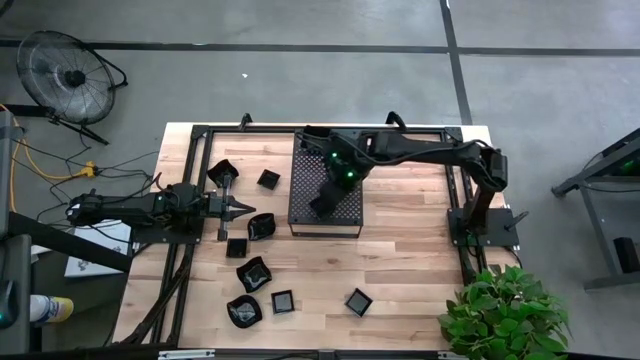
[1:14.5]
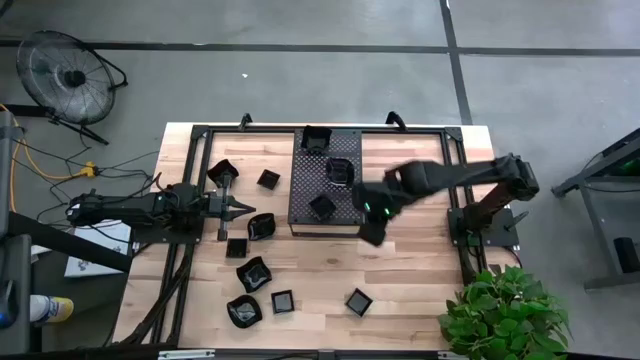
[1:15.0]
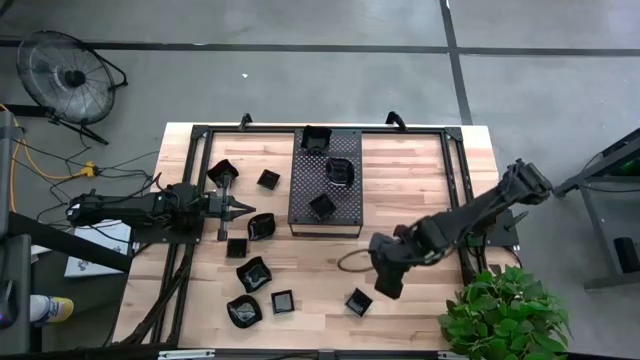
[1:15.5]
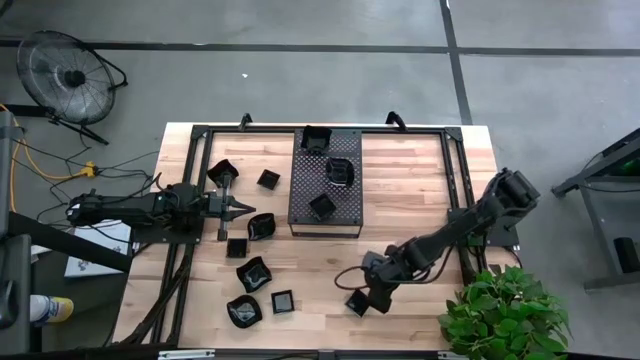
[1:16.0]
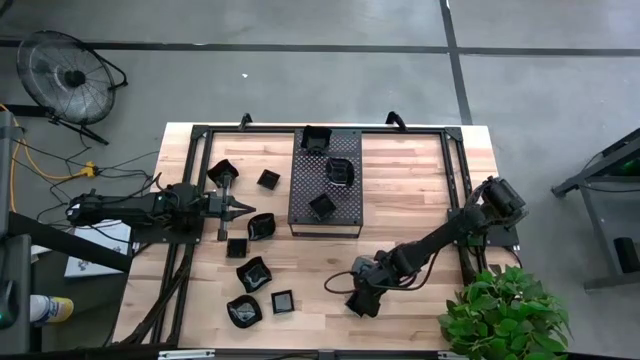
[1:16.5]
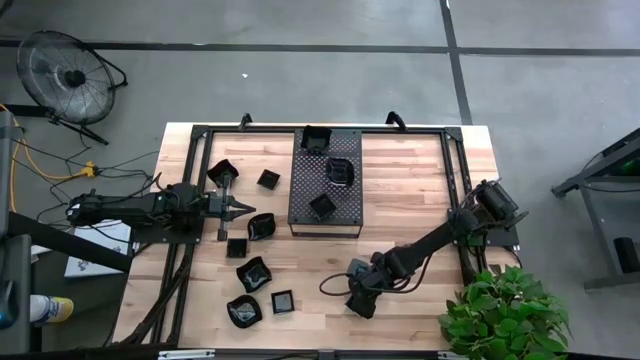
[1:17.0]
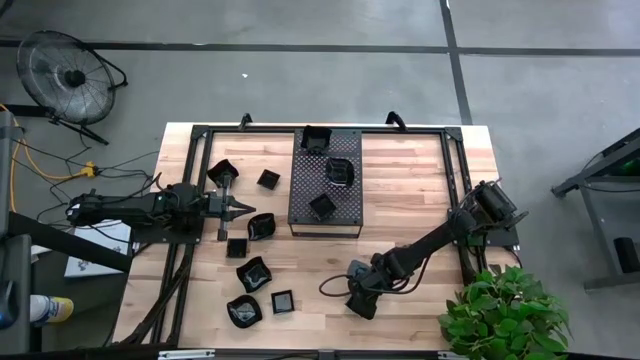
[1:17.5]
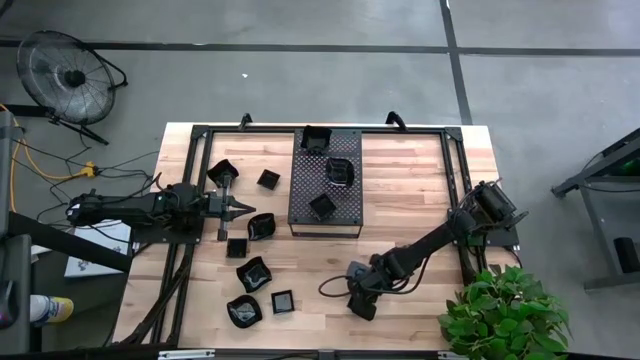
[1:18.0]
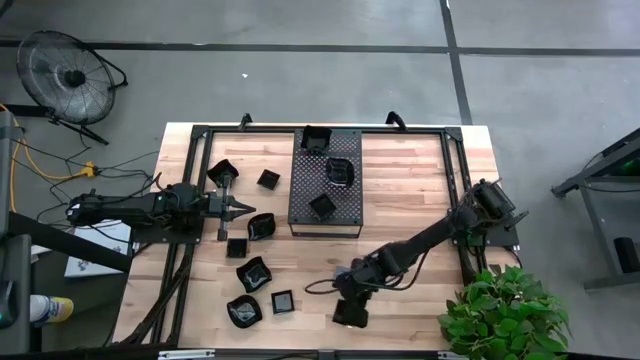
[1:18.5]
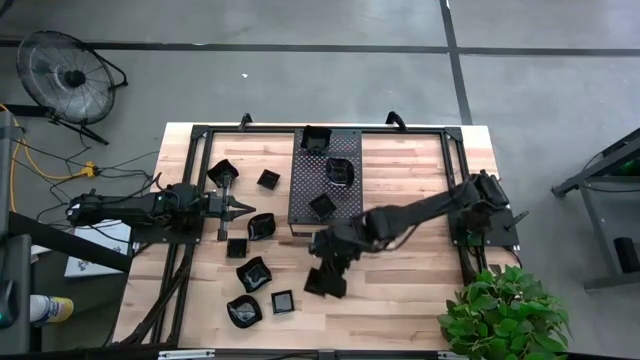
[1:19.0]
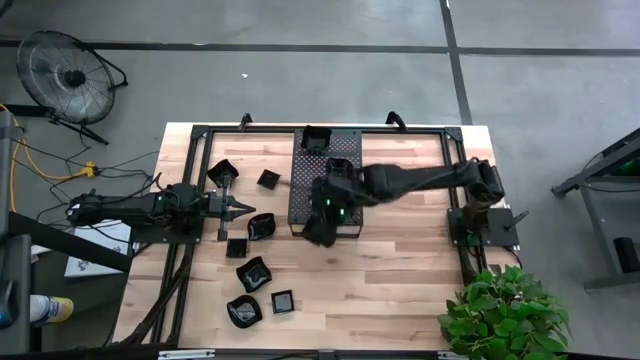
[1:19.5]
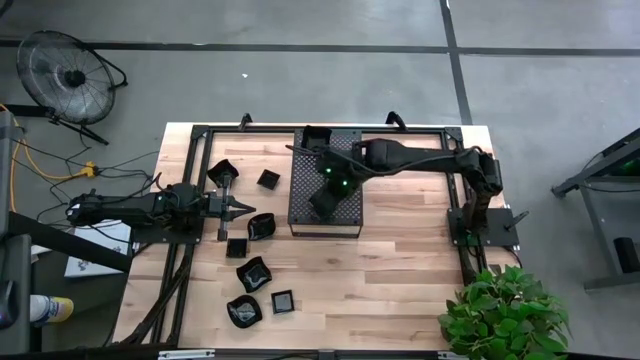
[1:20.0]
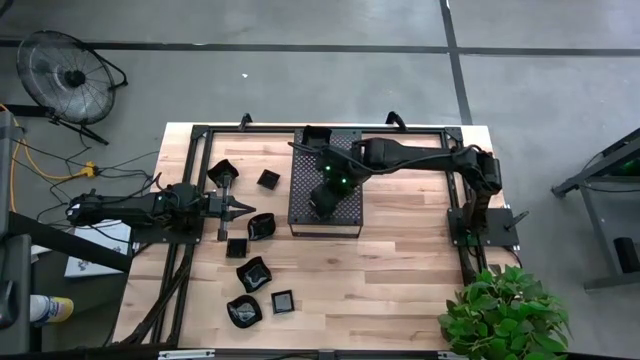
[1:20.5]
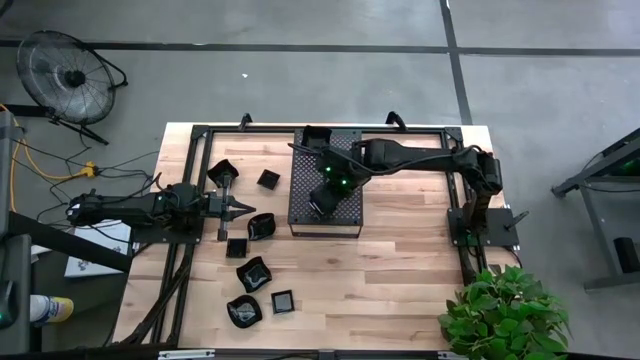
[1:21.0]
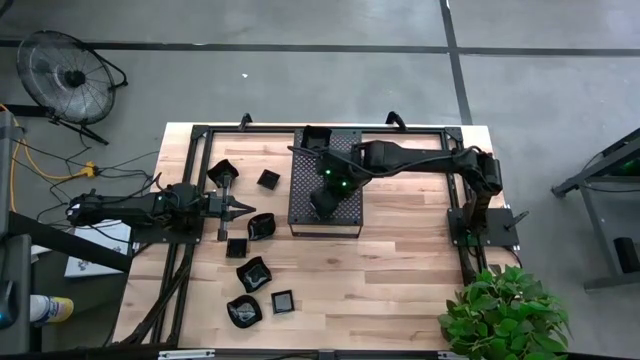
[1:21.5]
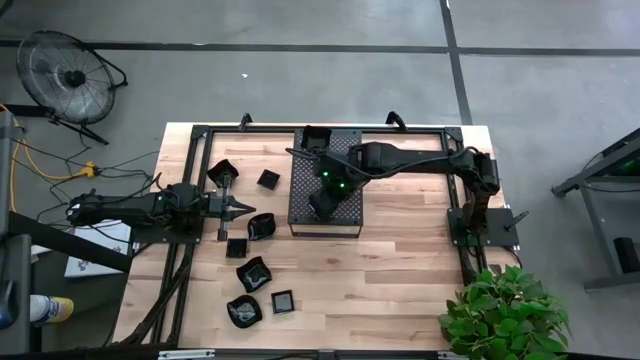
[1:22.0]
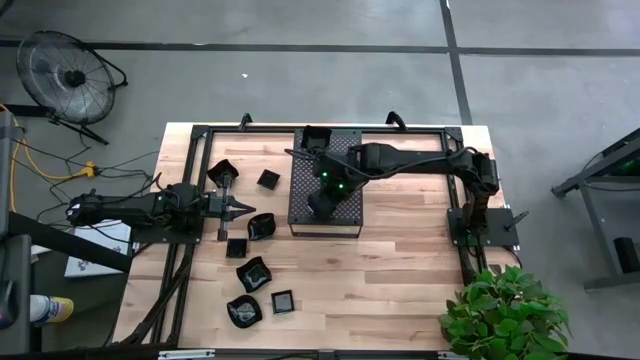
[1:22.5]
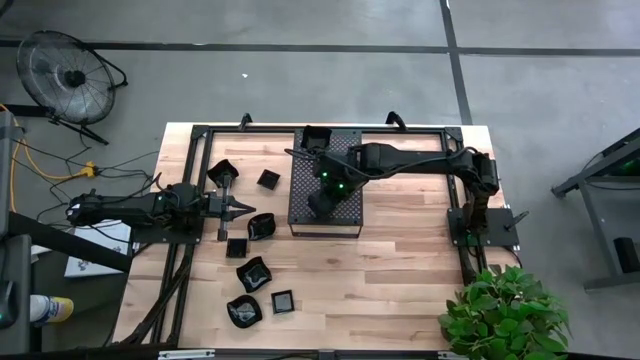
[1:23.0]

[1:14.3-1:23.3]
Task: Pick & Place Mini shaped plates
Stack the black square shape plate on top of the other black square shape plate on the shelf

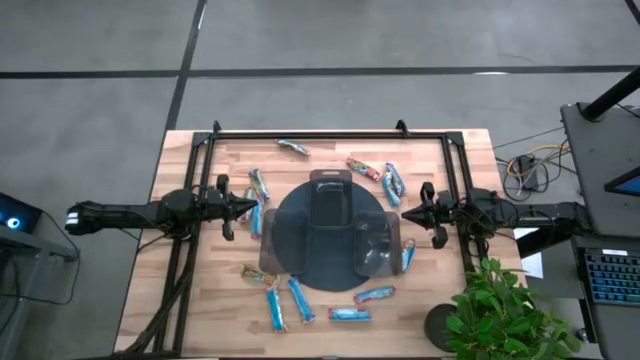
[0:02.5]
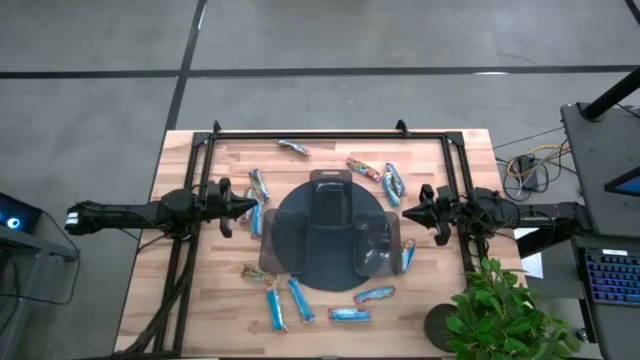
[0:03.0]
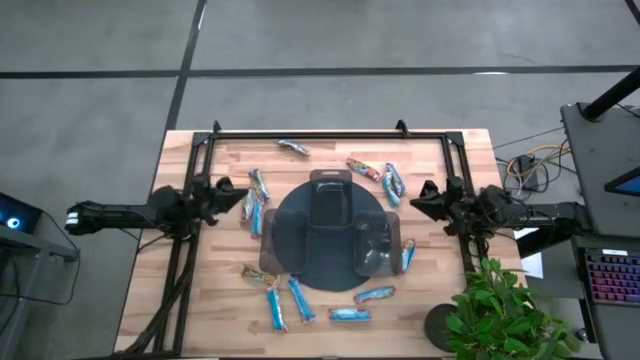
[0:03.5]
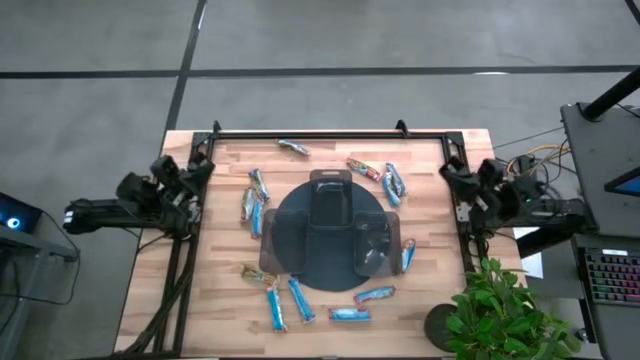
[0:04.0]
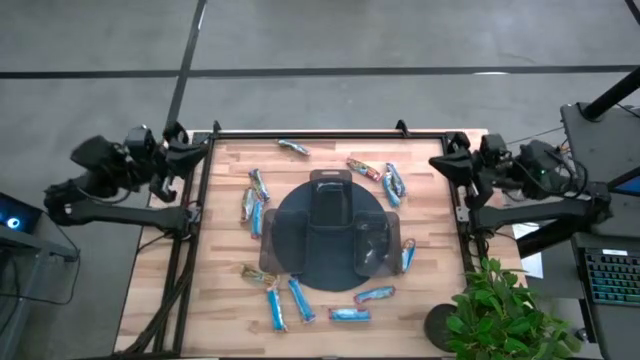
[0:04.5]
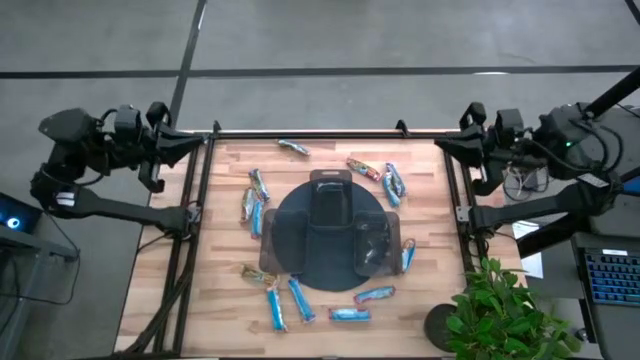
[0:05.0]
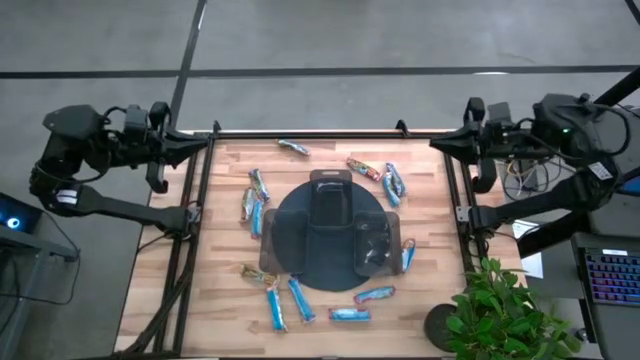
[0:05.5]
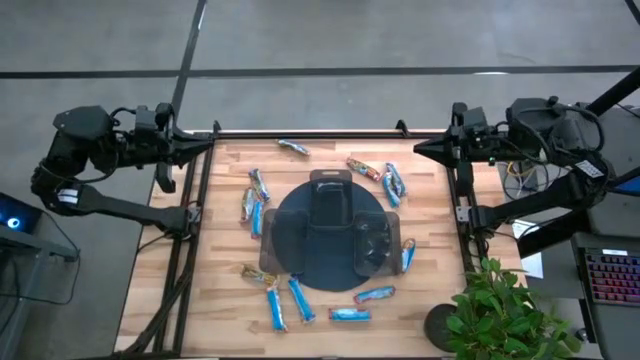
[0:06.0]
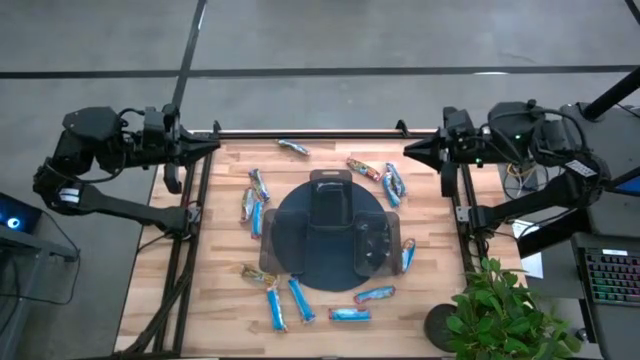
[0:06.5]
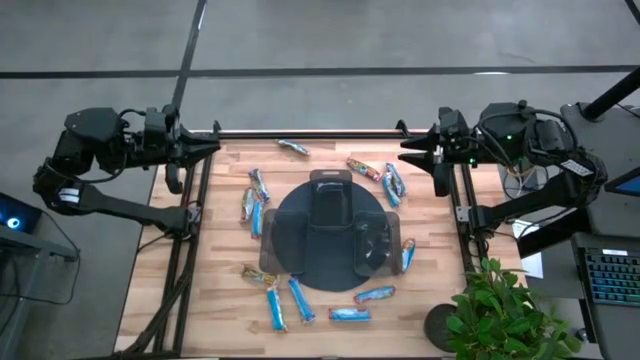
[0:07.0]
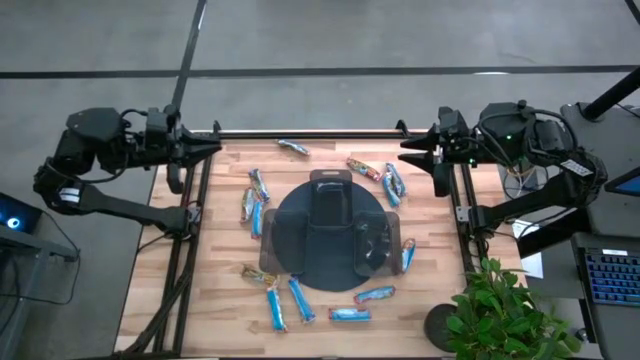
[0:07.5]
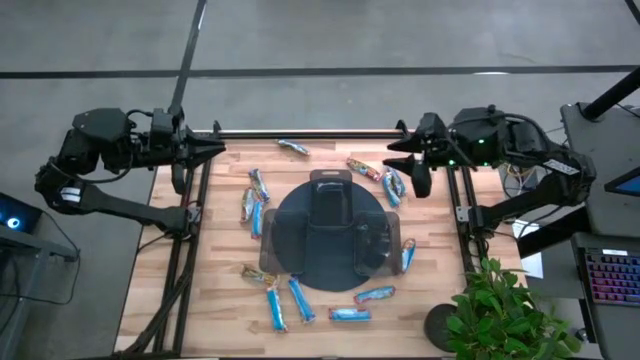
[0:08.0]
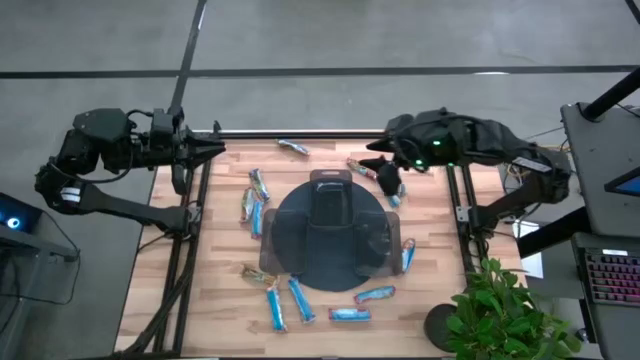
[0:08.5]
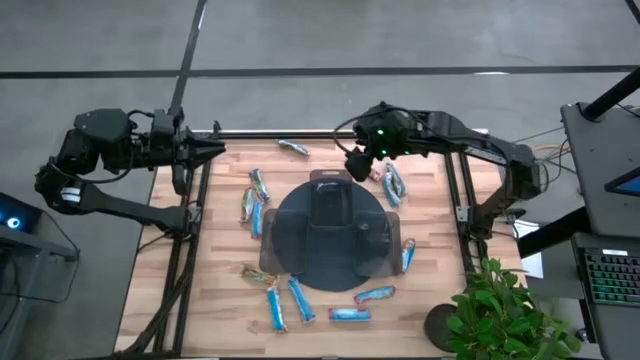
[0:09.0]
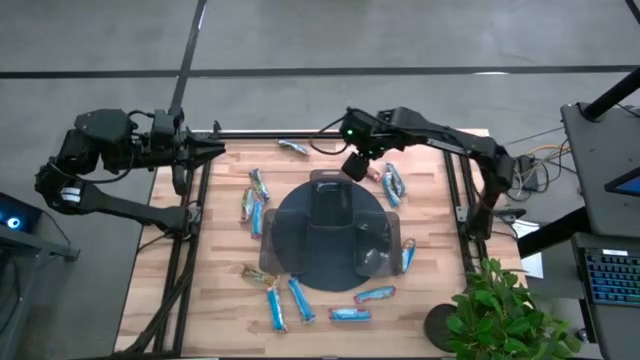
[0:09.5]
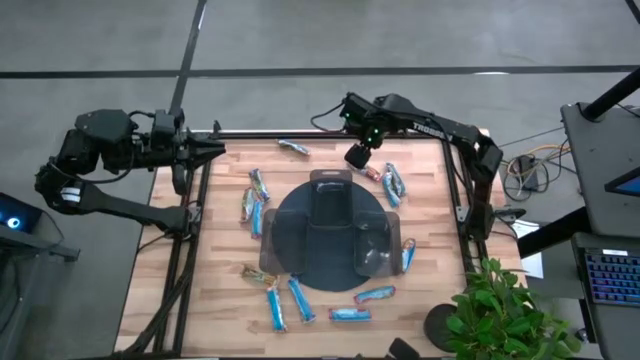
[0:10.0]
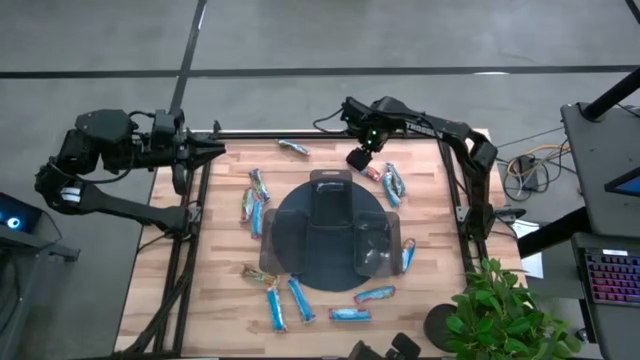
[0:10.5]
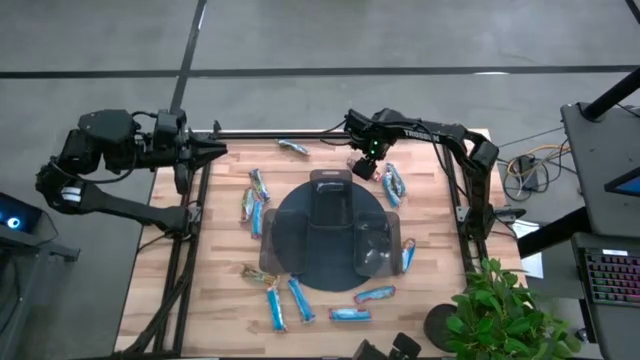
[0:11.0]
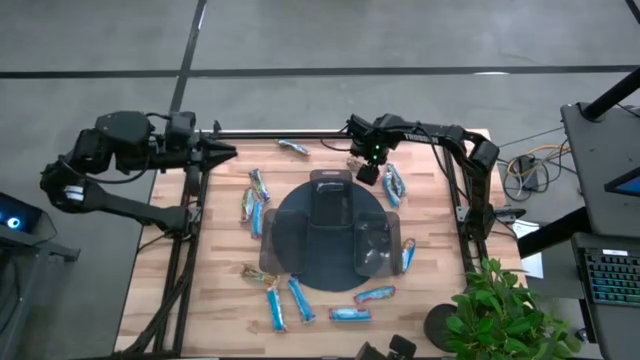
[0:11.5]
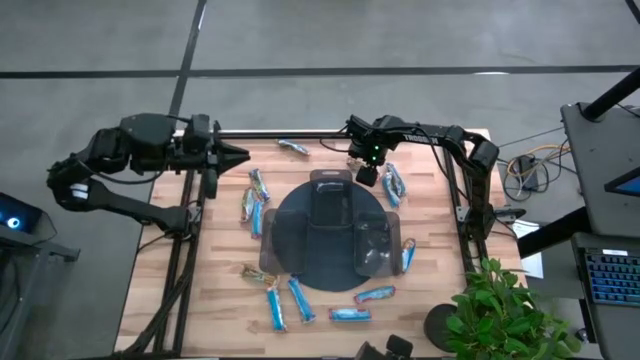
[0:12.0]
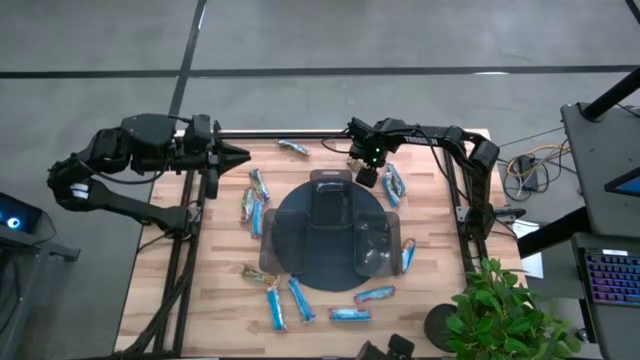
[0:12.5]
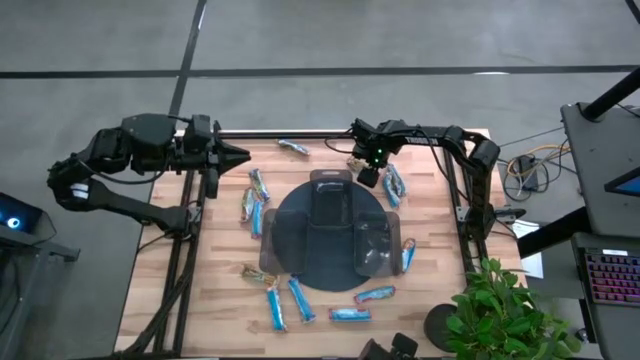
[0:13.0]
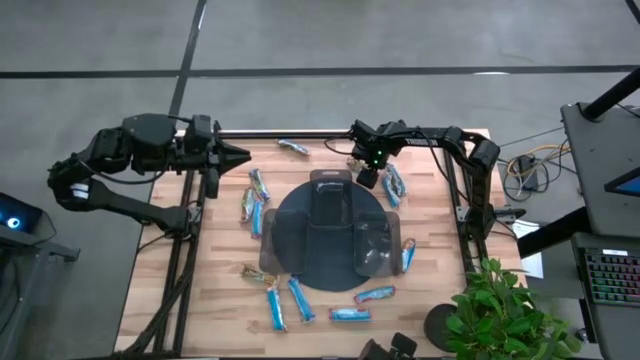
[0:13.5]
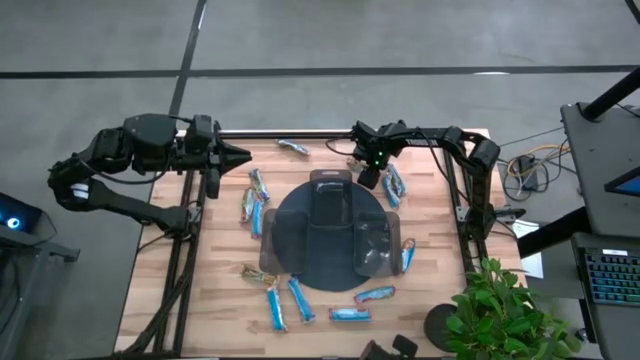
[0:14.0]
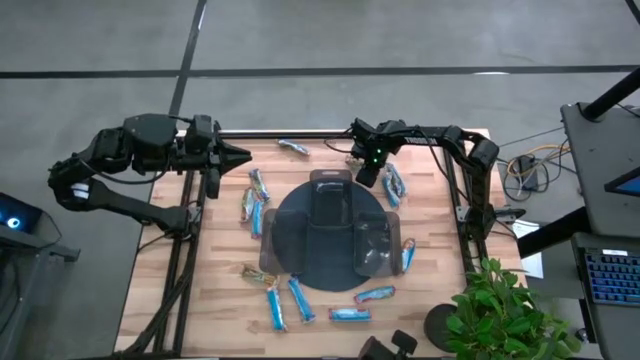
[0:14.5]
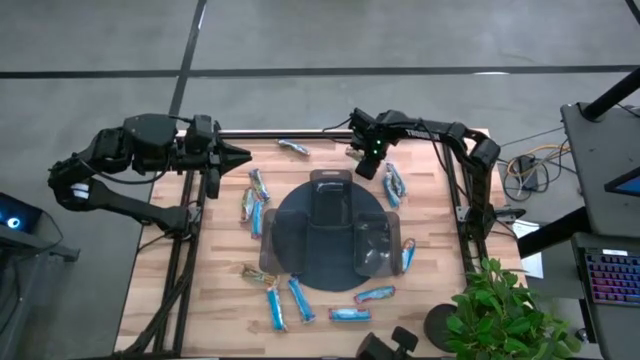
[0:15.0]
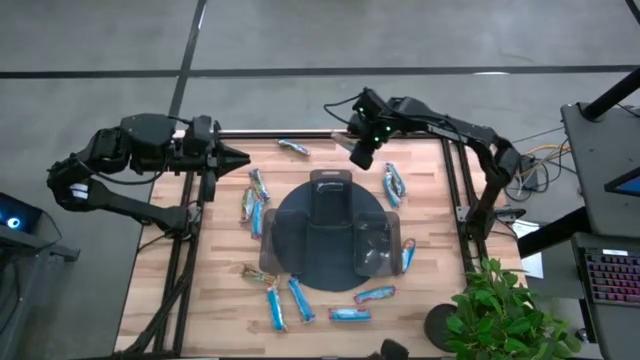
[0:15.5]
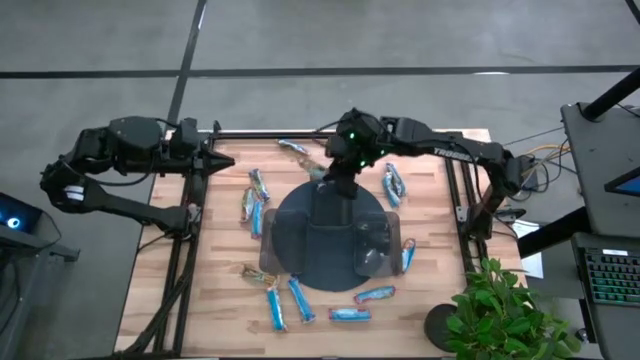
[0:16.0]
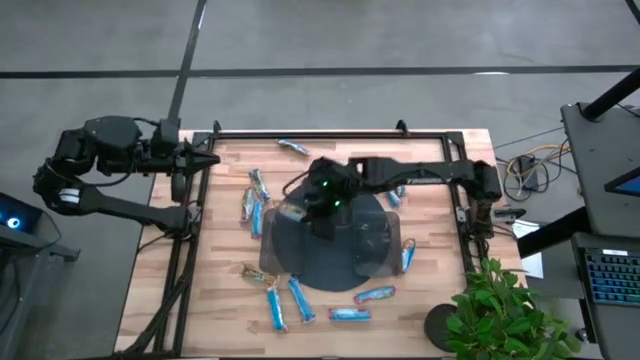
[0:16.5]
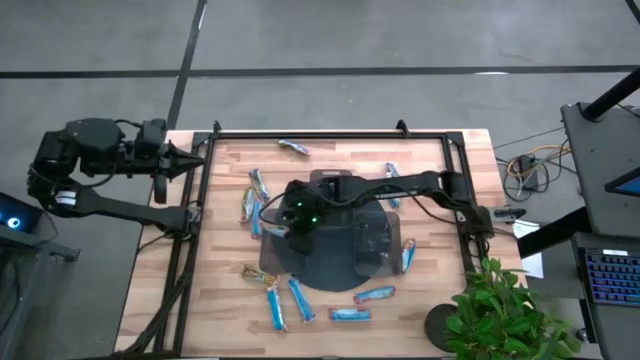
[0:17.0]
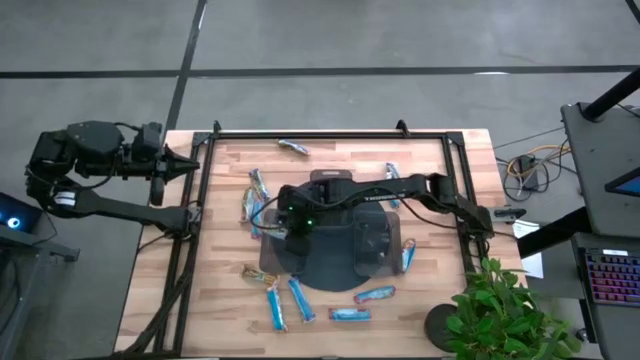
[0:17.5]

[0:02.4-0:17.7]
Task: Pick and place Granola Bars by type
Put the red granola bar into the bottom left black bin
